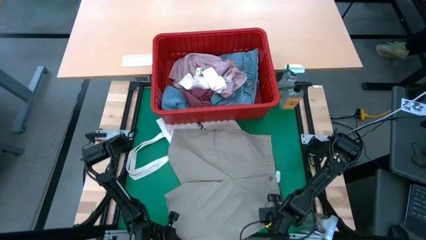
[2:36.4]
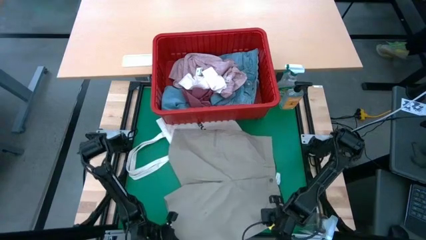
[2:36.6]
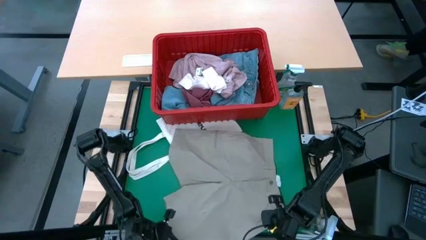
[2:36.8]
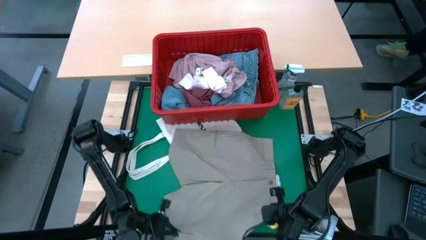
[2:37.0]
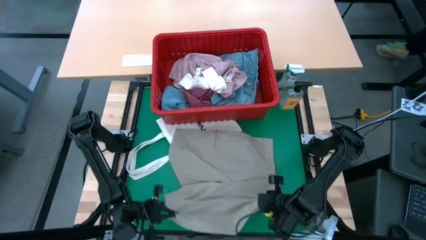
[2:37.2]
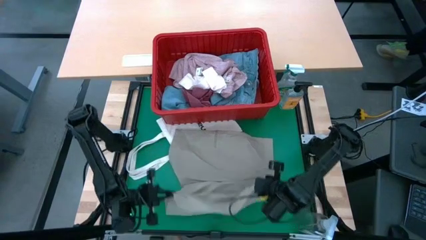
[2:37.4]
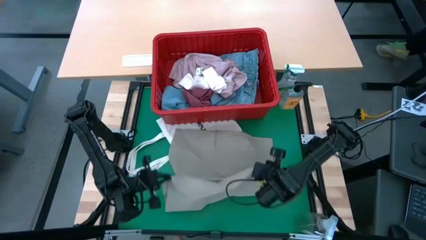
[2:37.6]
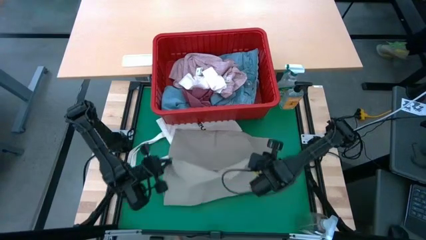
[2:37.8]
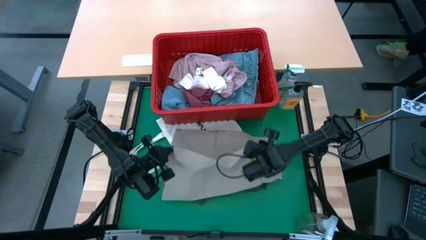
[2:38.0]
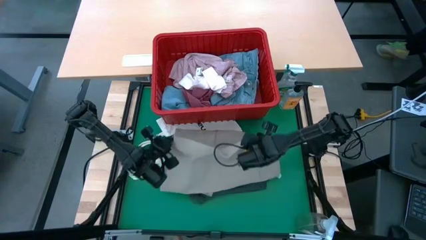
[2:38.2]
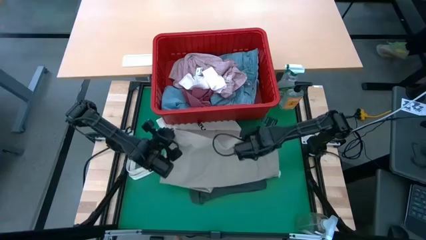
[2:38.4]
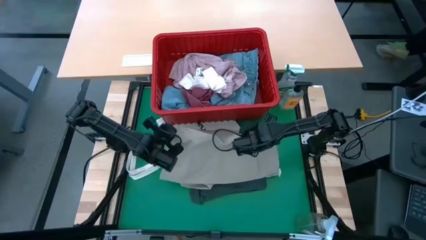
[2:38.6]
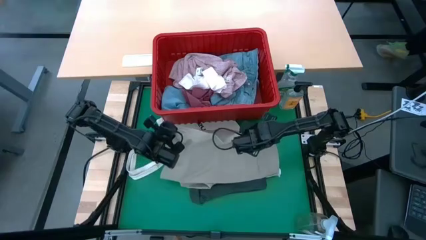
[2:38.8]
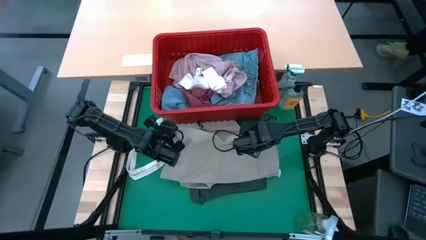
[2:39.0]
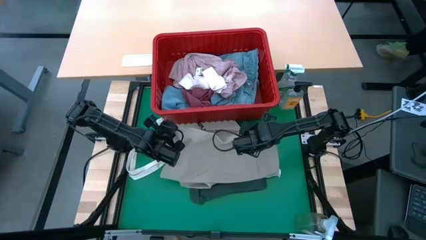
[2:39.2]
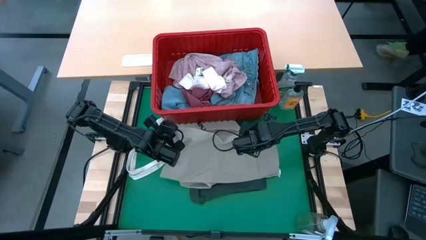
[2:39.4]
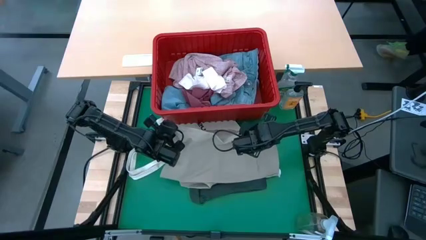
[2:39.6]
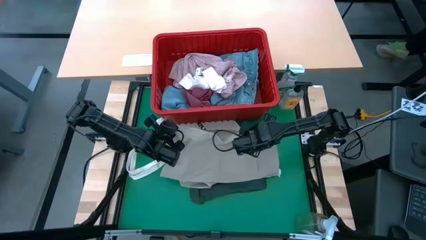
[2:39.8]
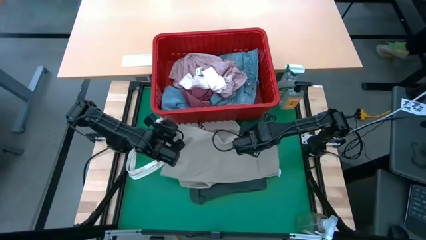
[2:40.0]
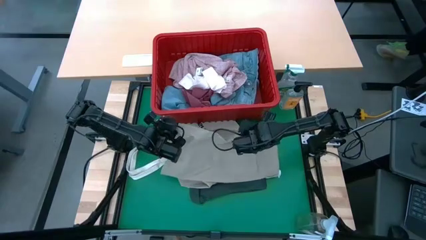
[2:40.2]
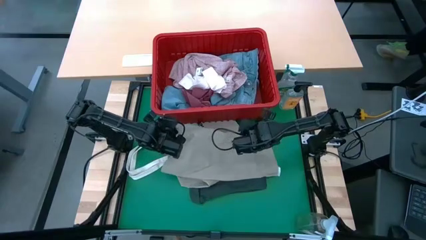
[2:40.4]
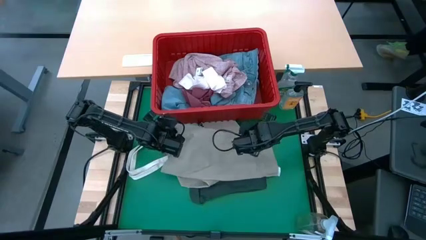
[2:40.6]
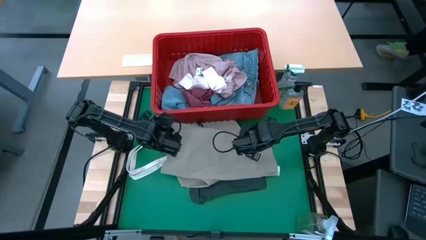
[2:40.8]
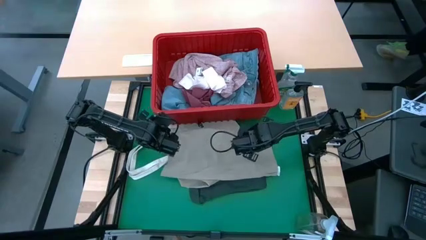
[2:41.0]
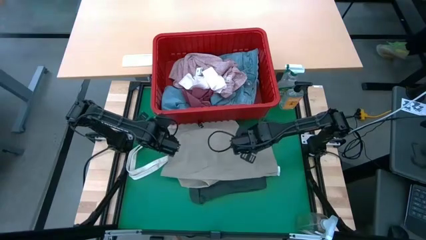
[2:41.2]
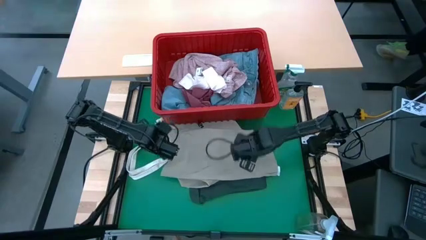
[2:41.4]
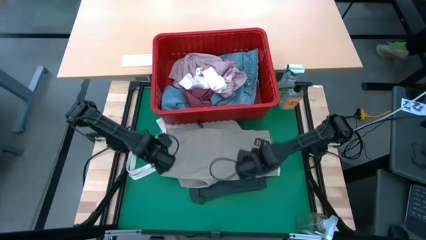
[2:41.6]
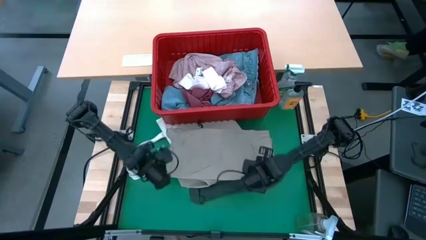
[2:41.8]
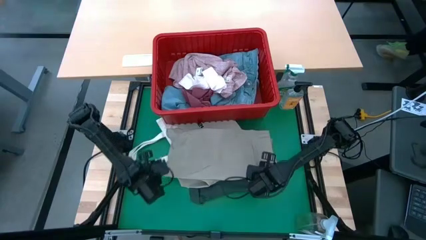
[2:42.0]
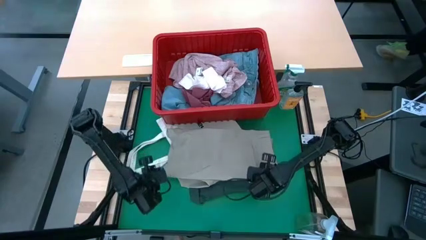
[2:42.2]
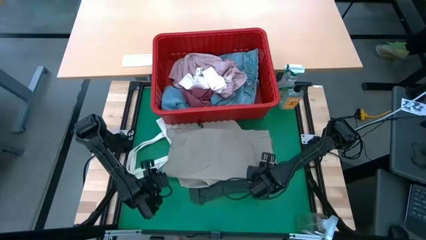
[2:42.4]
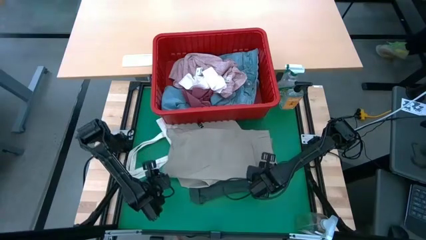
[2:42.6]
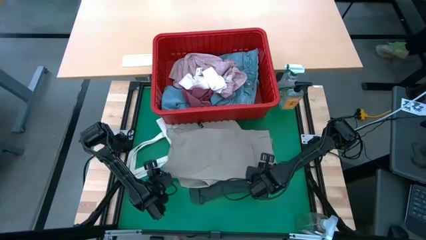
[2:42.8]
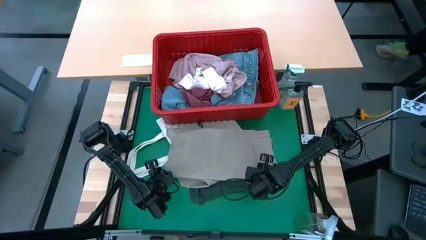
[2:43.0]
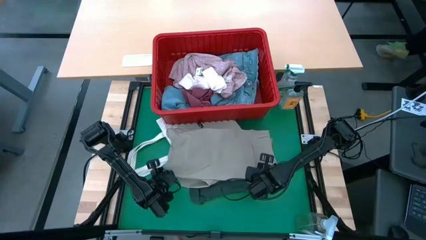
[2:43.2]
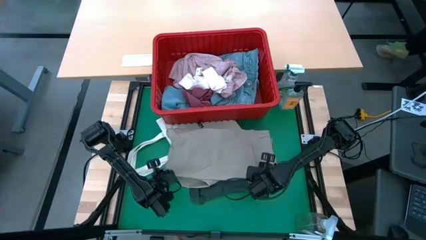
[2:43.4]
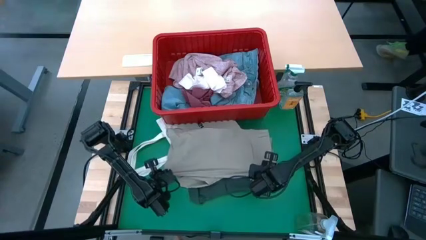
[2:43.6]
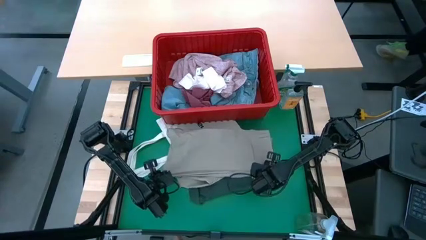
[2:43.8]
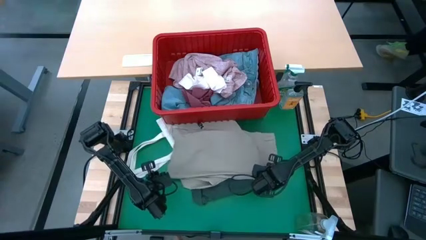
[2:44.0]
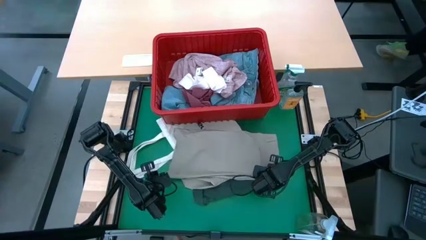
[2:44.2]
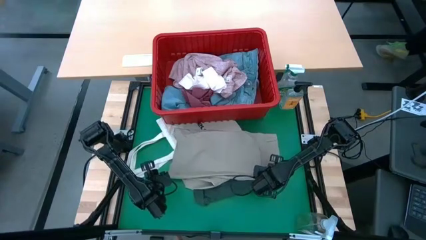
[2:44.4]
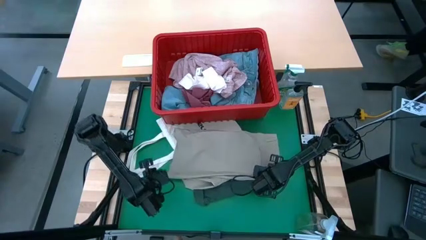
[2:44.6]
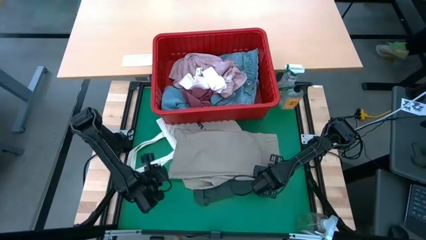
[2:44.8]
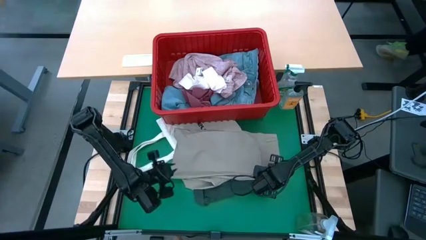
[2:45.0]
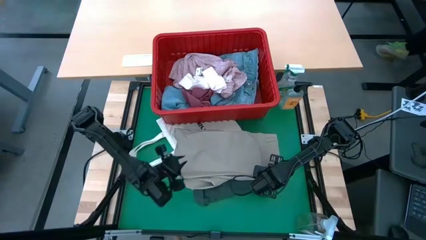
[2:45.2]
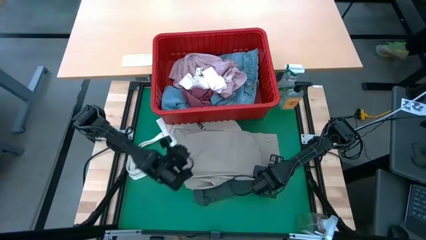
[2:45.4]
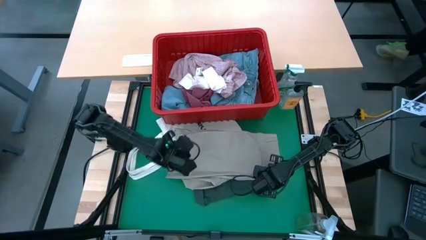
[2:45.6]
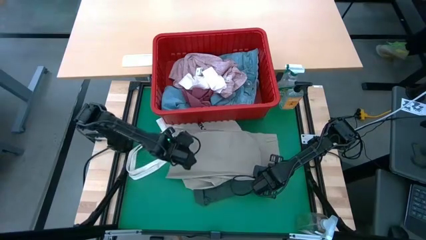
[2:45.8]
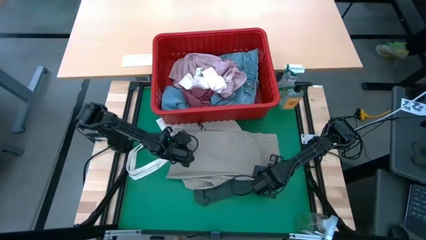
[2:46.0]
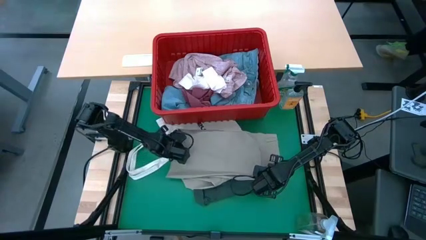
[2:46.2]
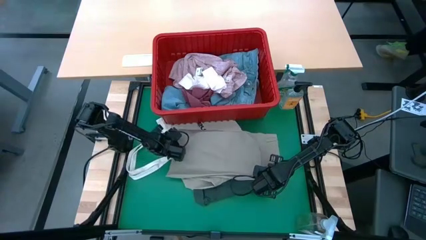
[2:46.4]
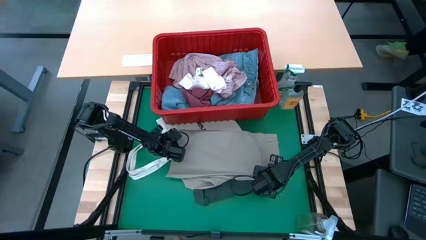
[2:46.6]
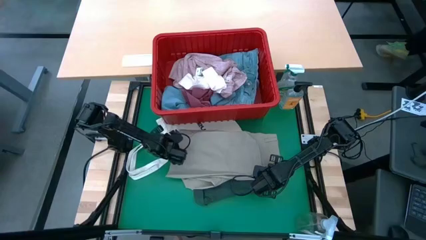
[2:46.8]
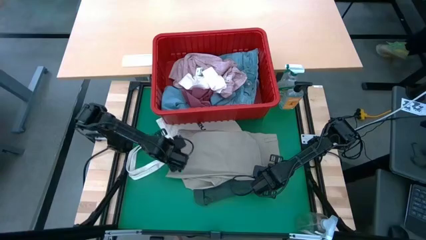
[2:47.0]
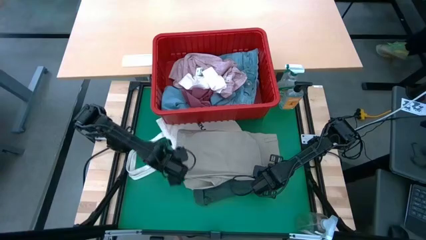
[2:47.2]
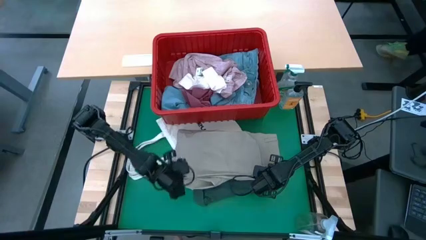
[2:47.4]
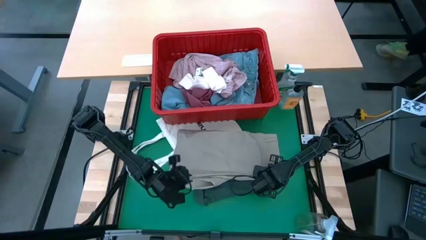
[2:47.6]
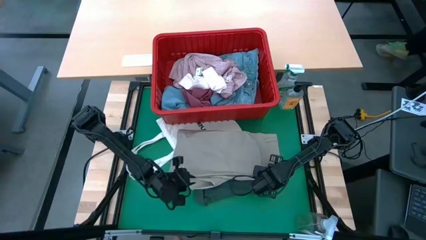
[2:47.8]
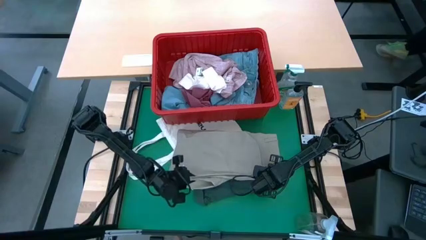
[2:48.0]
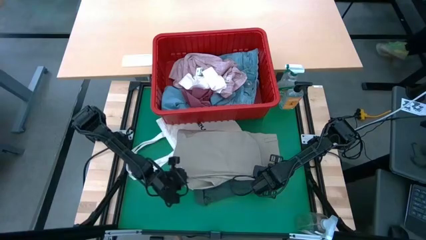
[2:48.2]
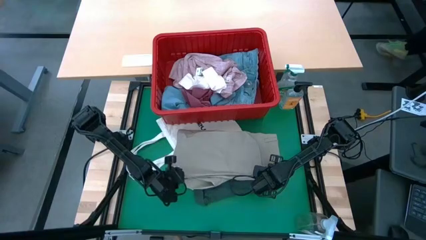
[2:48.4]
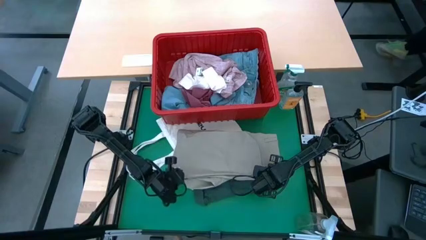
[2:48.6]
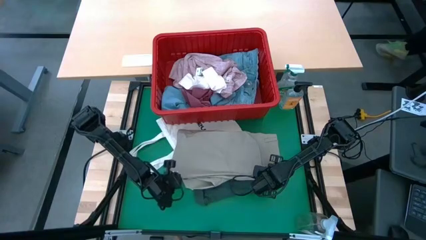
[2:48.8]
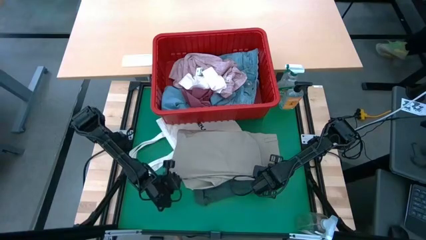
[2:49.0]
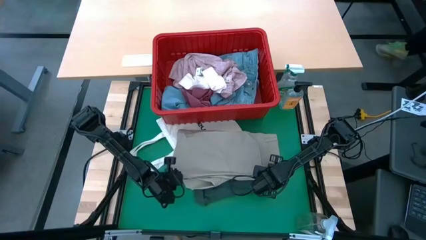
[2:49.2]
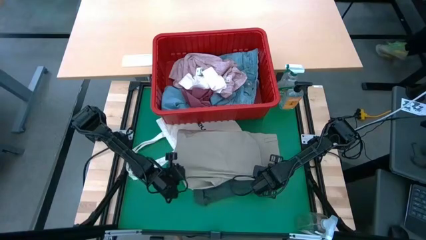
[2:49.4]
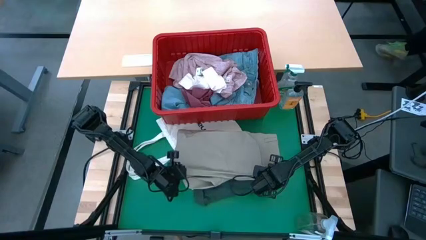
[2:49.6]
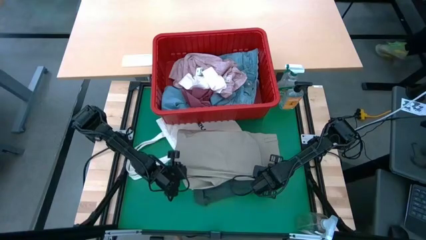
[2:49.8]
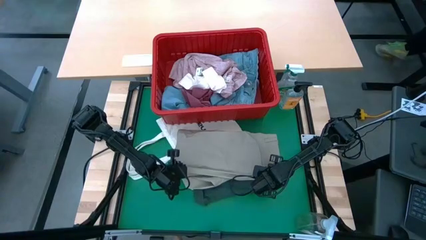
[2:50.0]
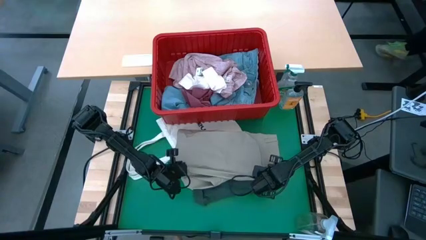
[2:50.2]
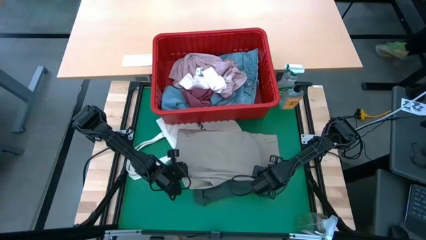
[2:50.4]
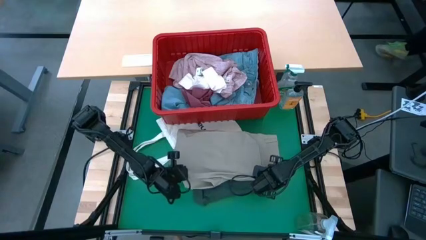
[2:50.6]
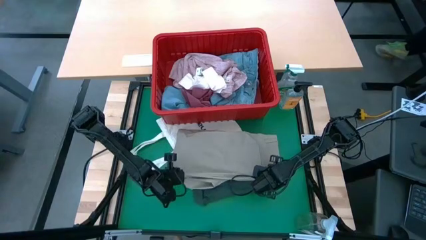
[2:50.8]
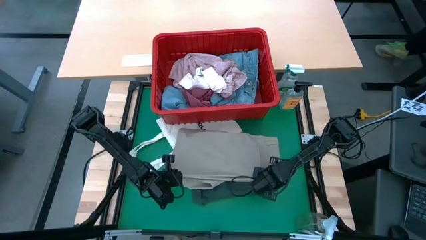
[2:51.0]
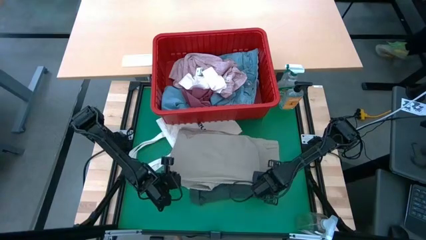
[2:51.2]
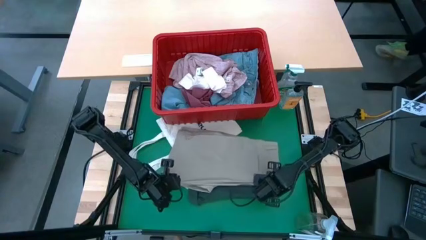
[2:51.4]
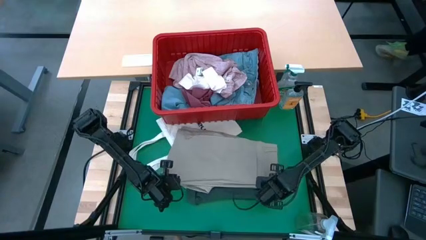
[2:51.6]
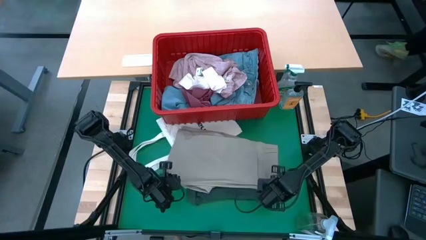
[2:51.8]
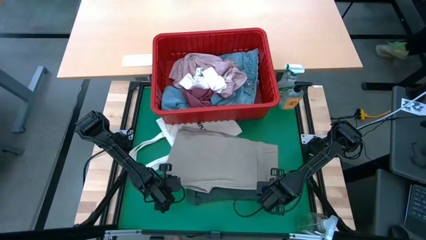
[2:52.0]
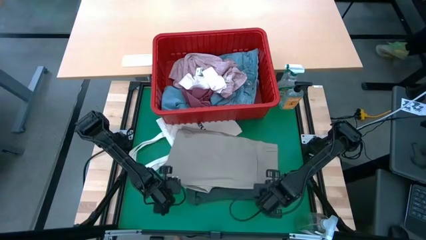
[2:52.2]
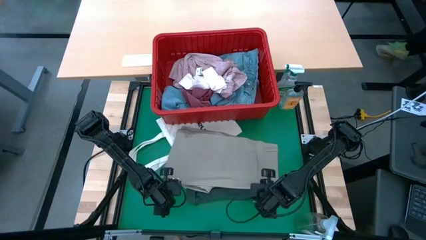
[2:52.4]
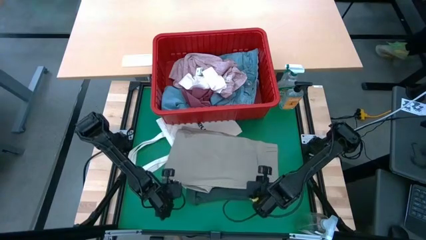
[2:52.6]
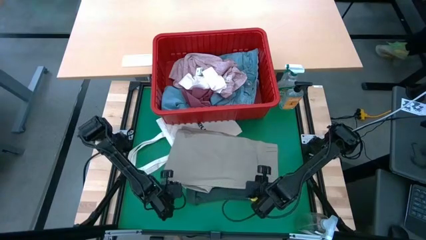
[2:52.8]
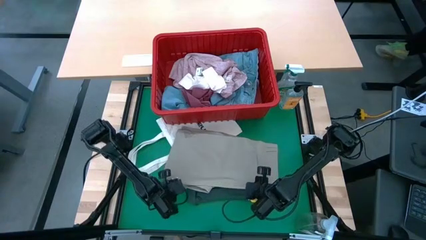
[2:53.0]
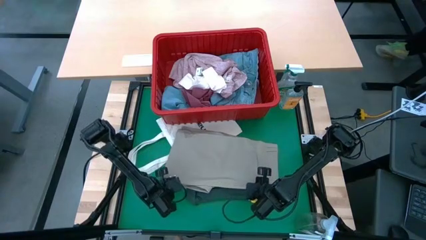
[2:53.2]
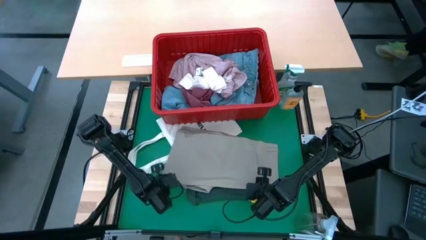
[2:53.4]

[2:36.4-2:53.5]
Task: Fold laundry
Fold the grey shorts
